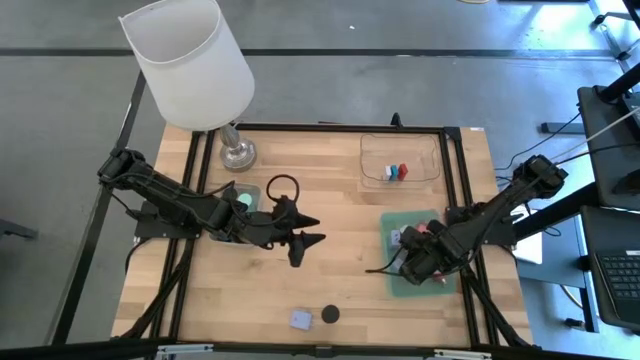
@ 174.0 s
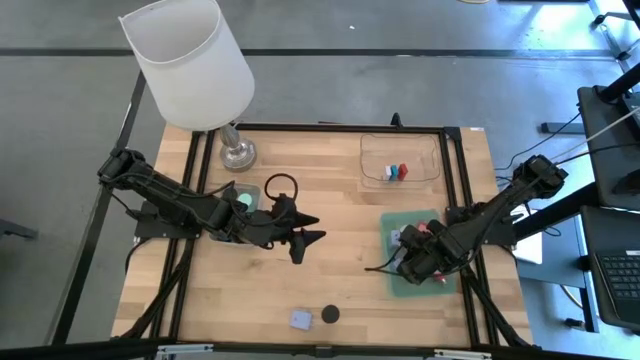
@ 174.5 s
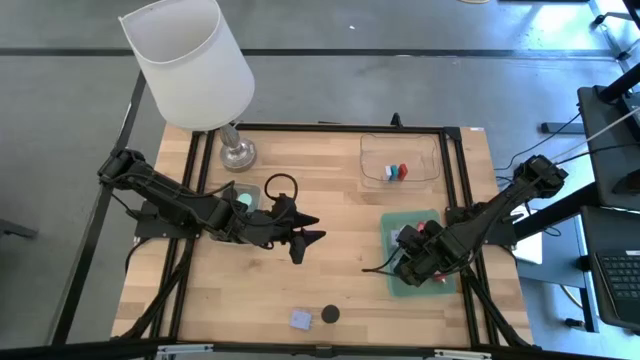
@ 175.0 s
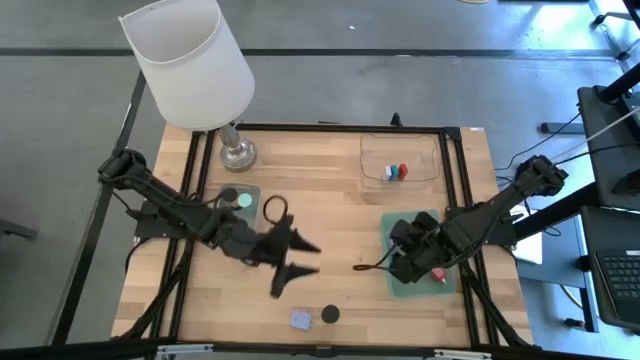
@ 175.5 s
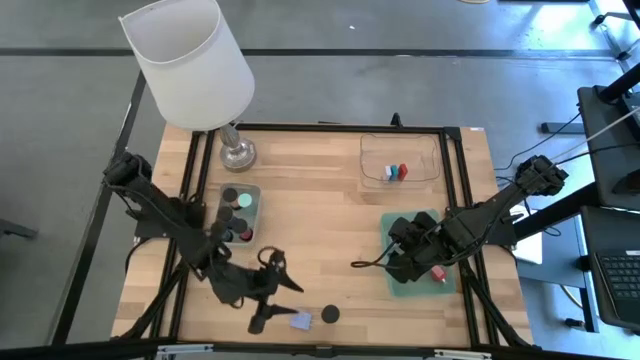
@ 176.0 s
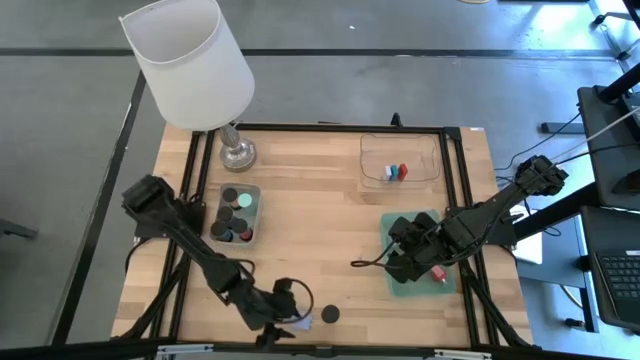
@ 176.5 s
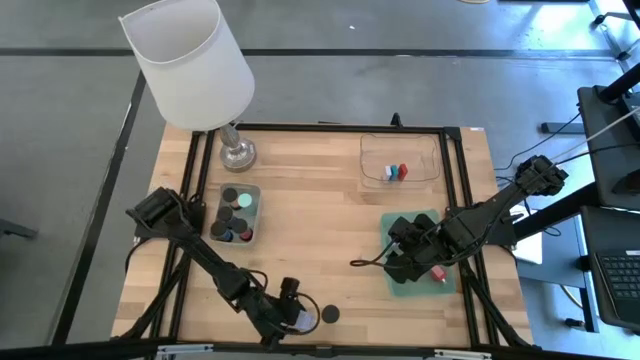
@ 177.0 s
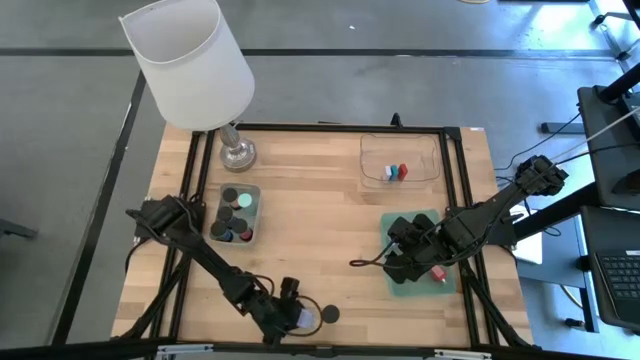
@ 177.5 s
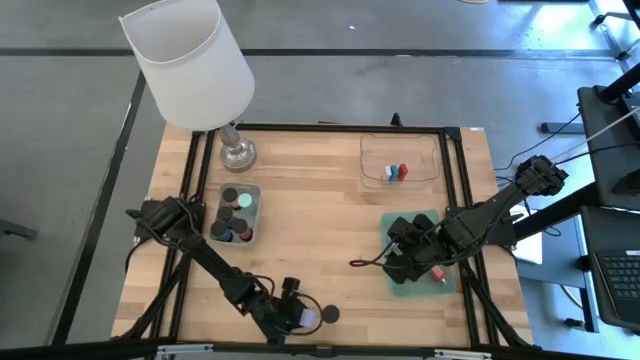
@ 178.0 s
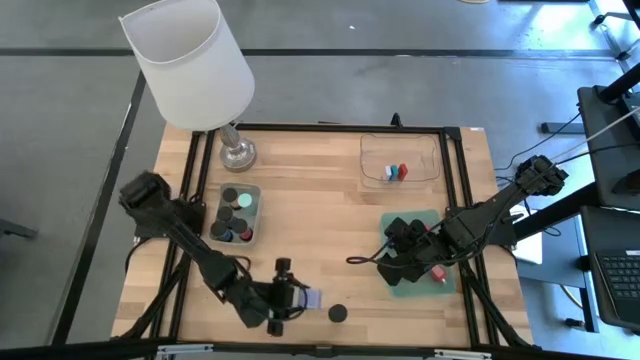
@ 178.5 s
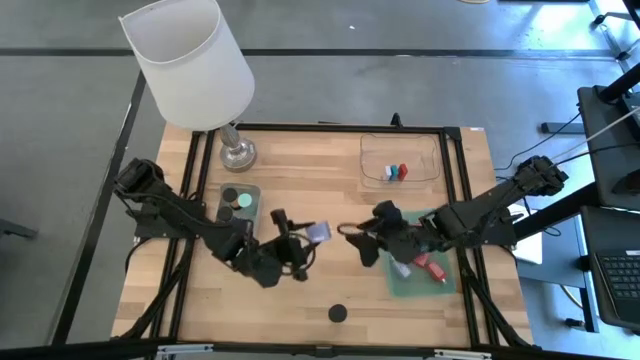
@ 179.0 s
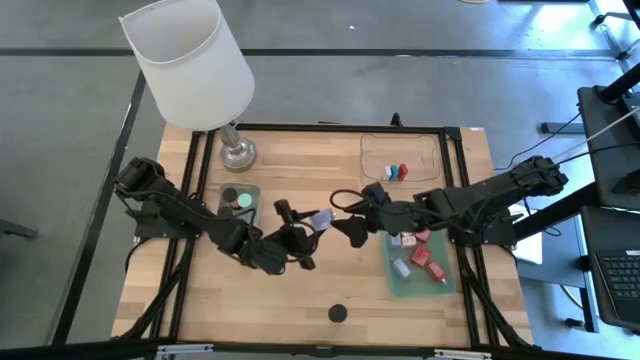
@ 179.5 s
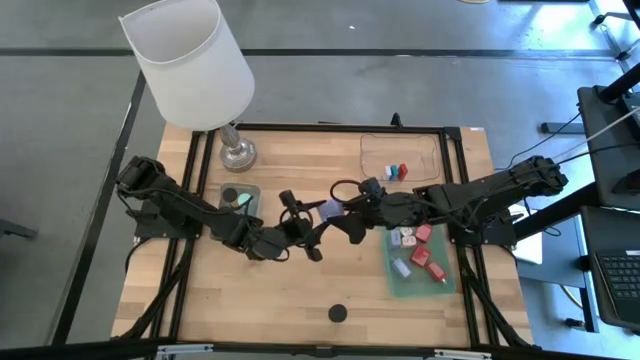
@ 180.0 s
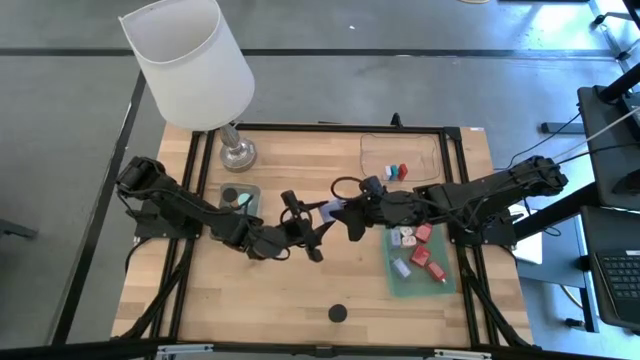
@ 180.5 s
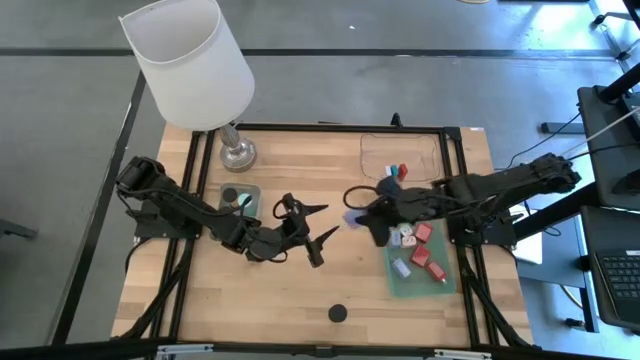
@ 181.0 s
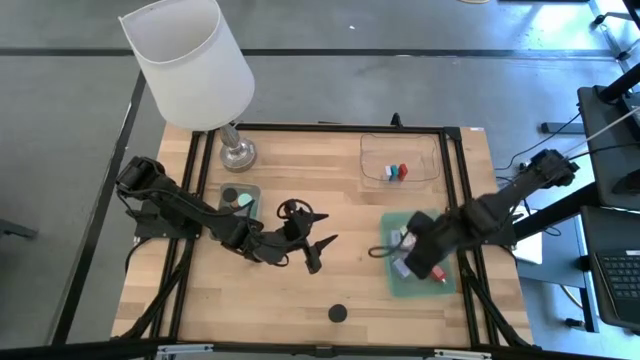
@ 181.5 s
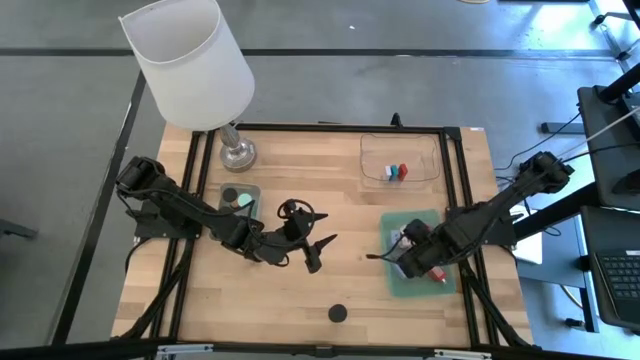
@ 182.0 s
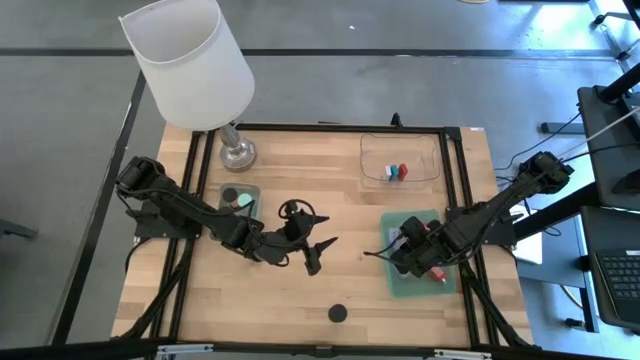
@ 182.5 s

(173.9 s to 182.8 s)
Task: Pick & Place Office items
Put the blue charger adapter into the green bin

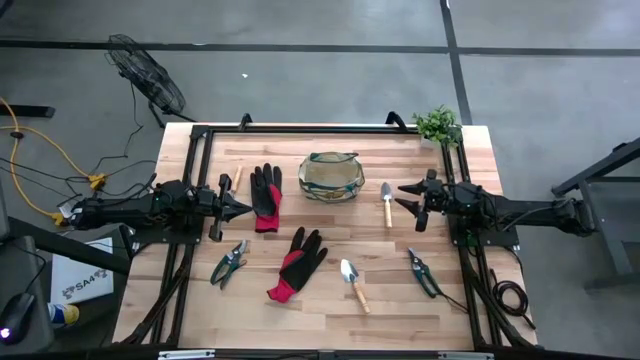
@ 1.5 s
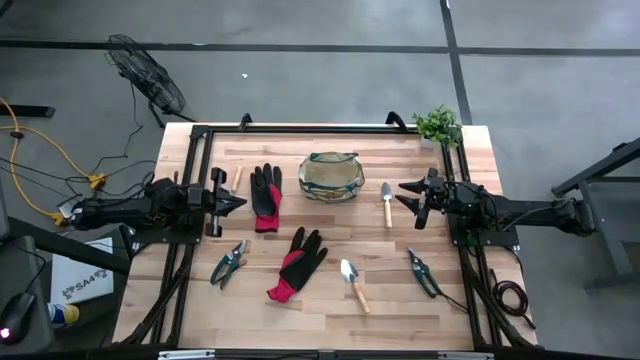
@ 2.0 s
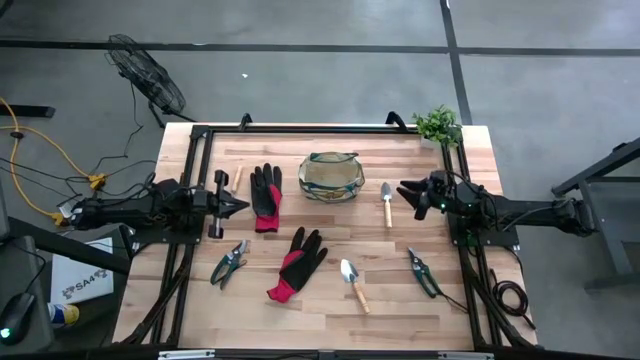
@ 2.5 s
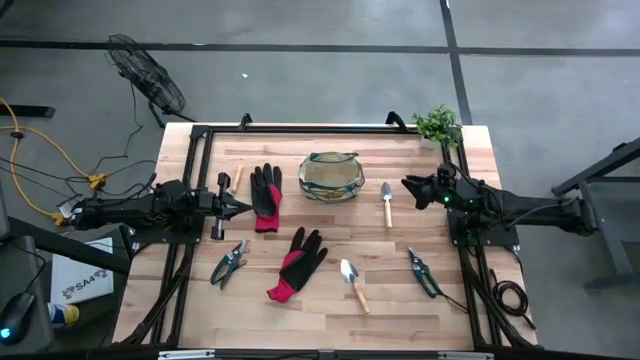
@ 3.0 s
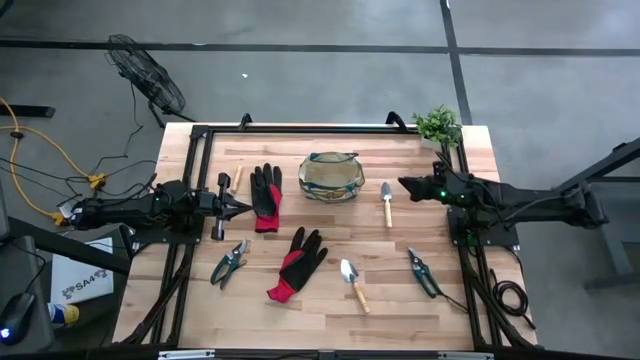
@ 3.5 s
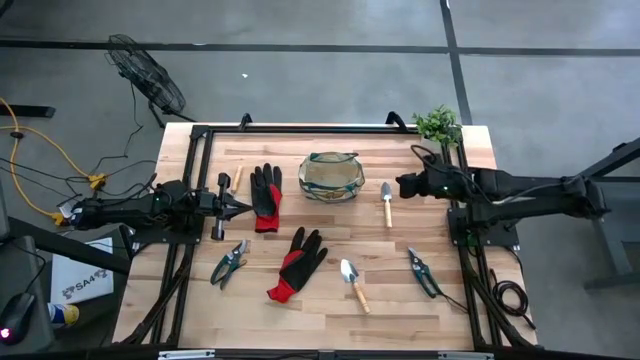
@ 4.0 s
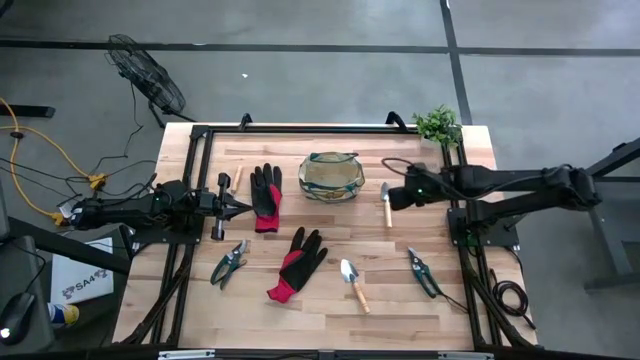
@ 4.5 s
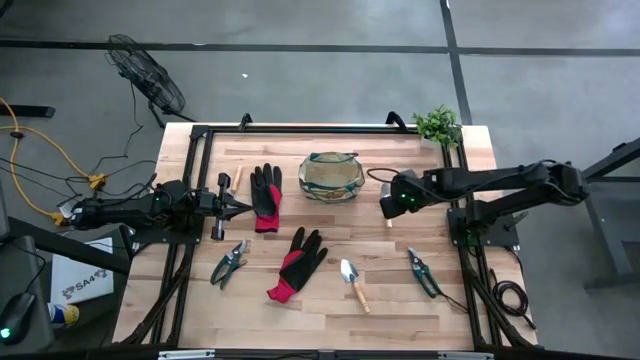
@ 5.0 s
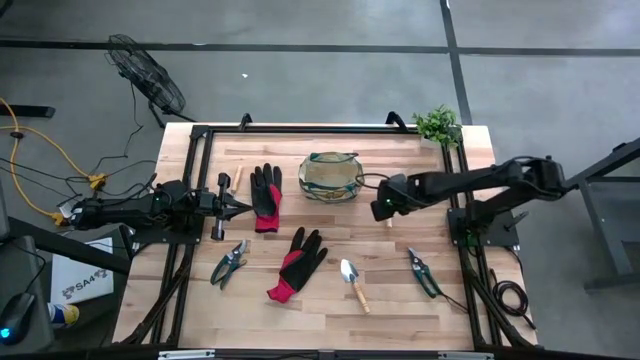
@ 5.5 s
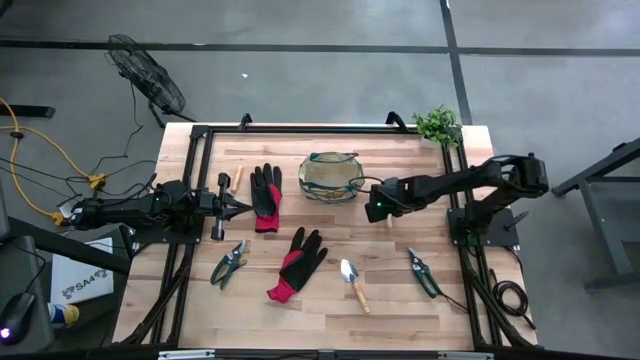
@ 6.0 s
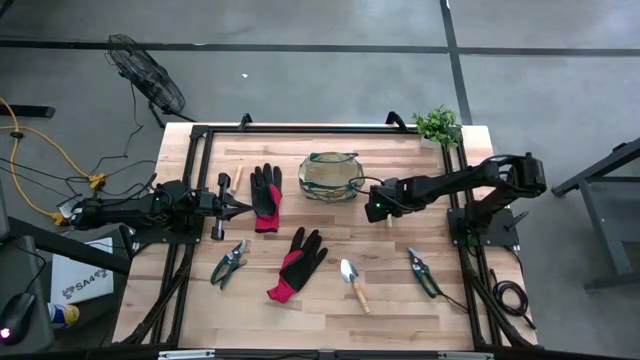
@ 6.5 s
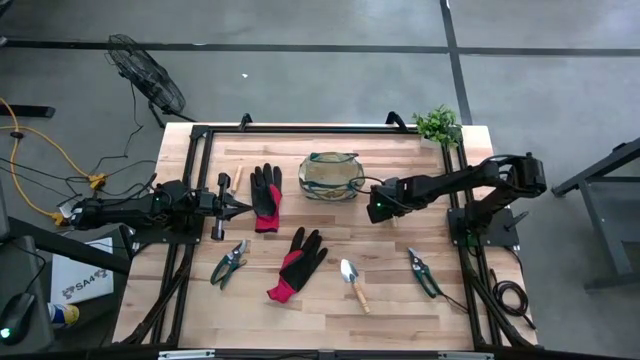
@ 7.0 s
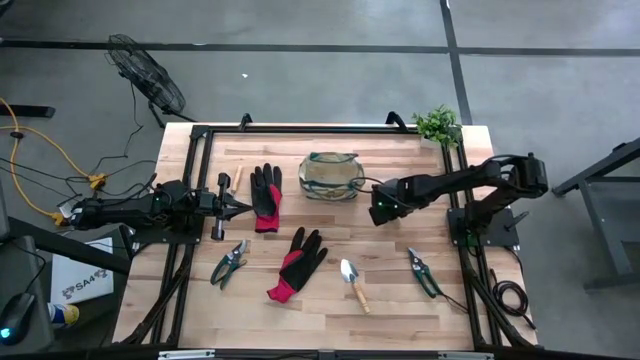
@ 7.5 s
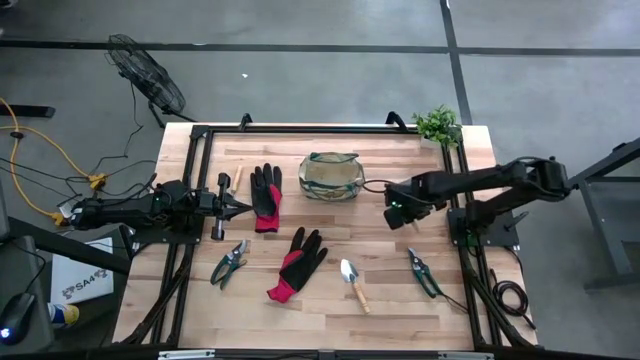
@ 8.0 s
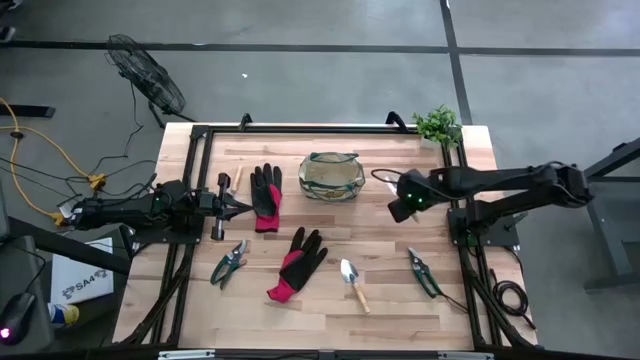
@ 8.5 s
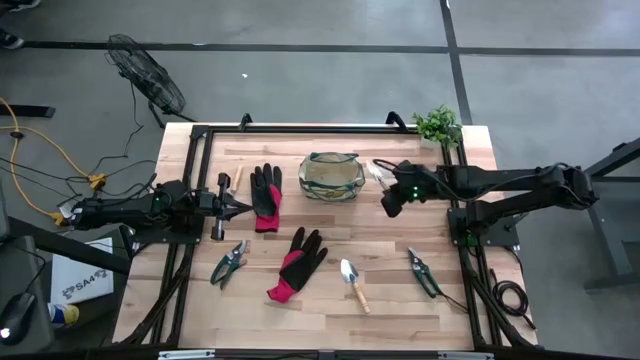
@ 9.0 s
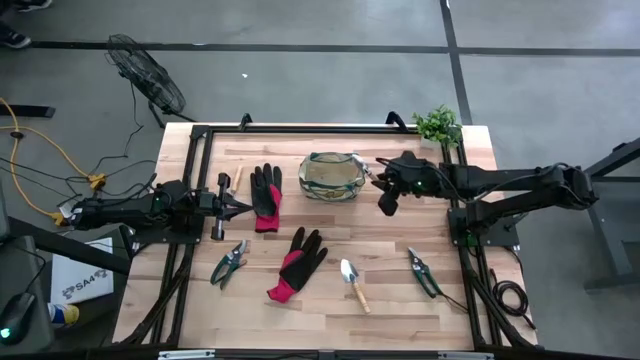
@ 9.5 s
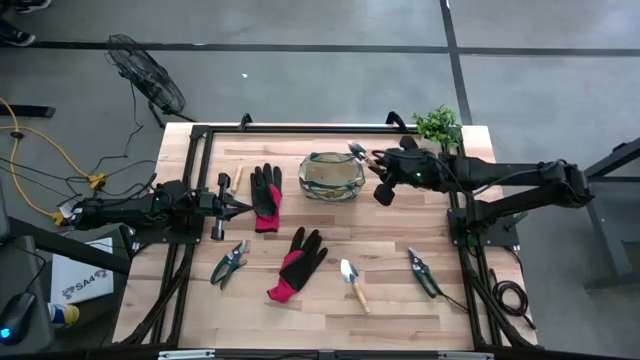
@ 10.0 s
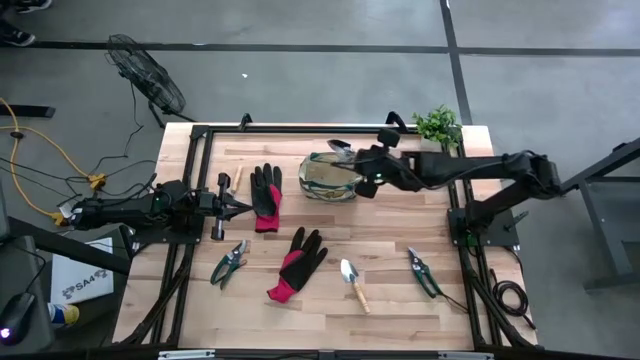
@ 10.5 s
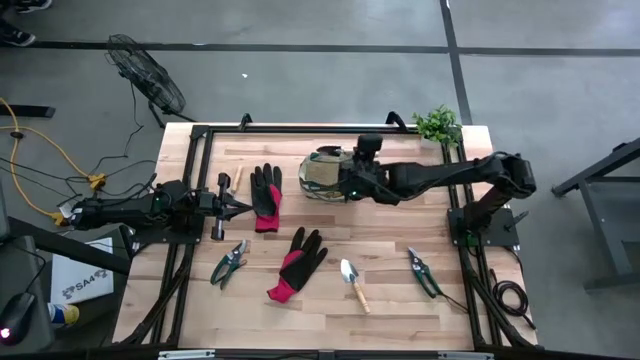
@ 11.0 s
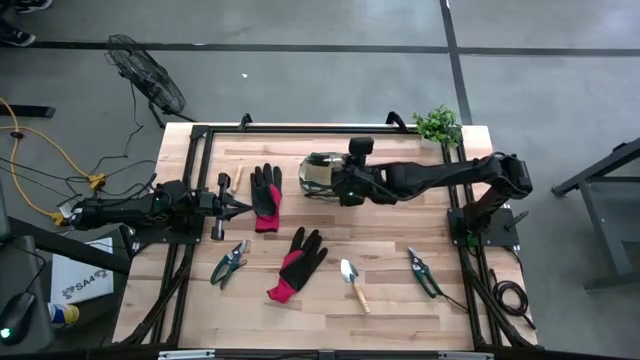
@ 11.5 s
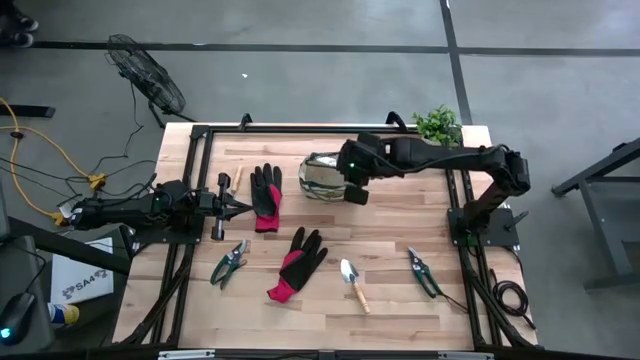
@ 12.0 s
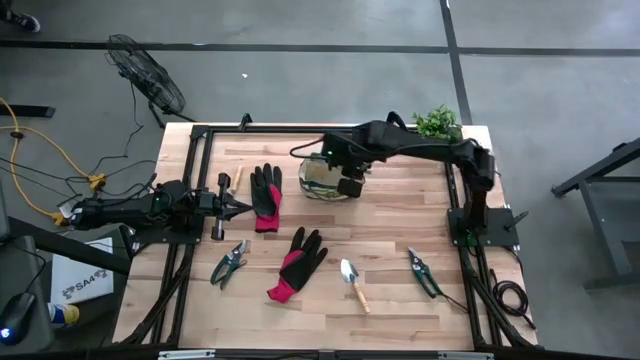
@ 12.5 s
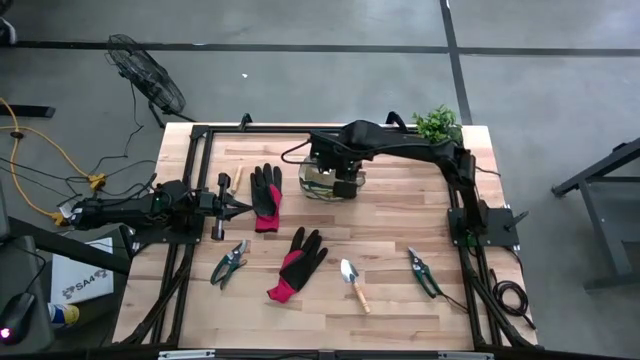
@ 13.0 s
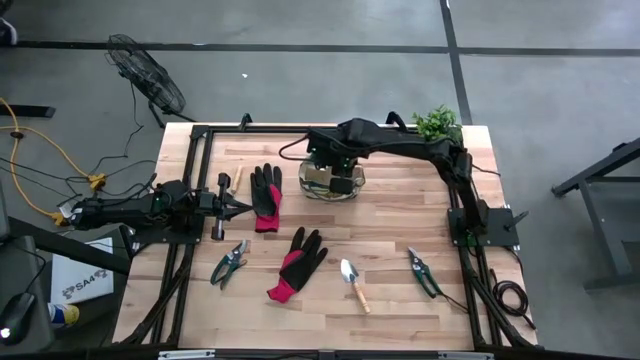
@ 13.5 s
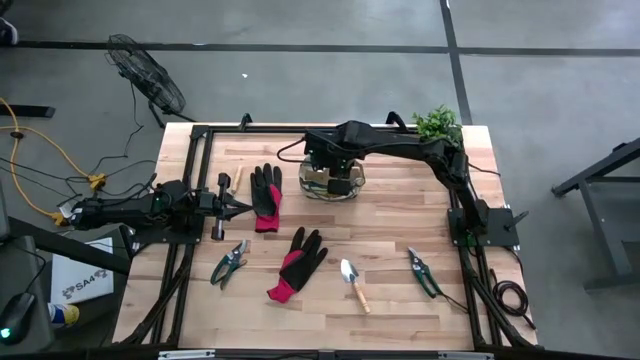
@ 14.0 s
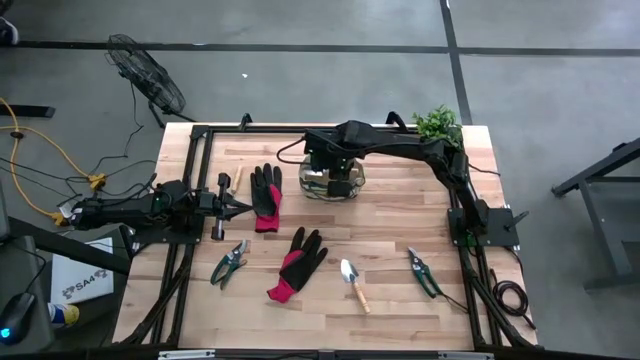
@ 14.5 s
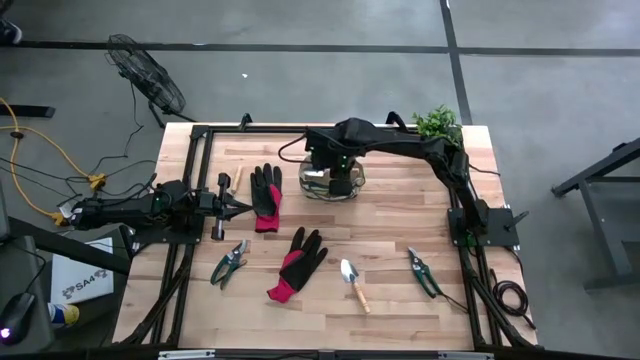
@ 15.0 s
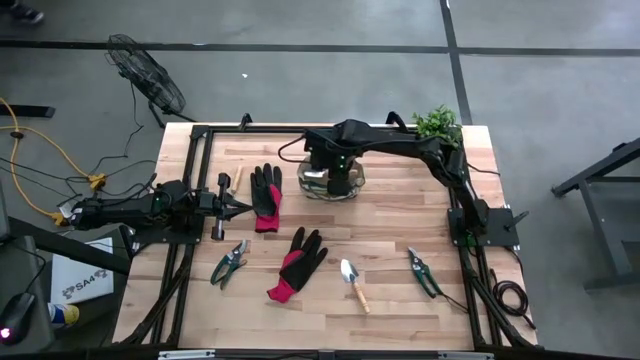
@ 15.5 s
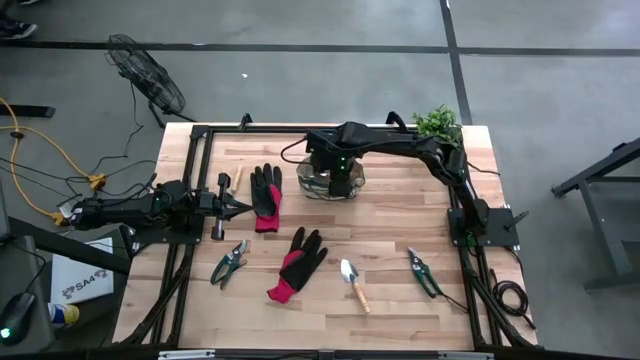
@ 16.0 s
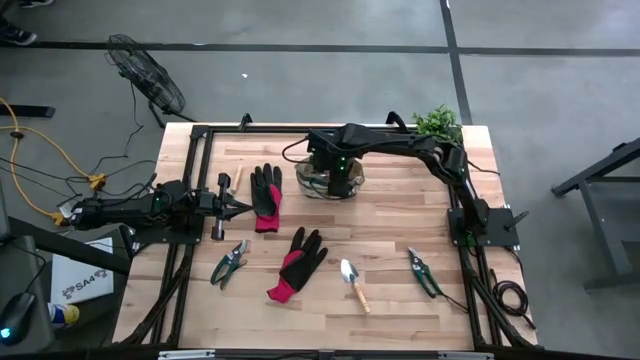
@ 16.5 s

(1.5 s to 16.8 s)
Task: Pick & Place Garden tools in Gardening bag
Put the top brown trowel into the gardening bag
